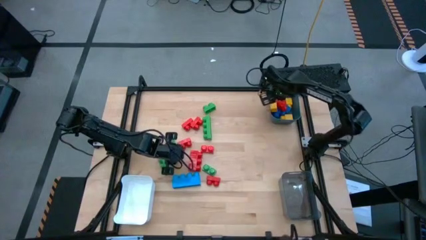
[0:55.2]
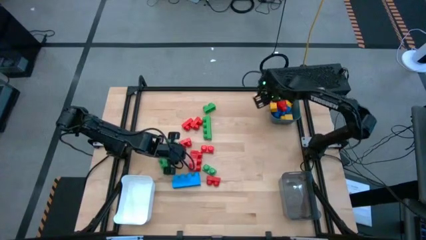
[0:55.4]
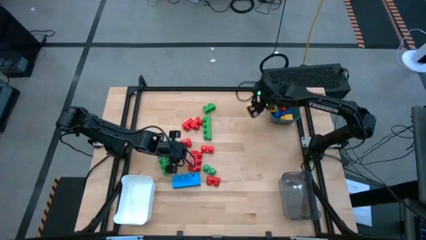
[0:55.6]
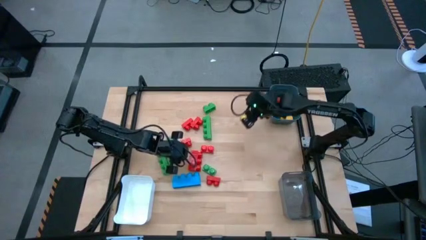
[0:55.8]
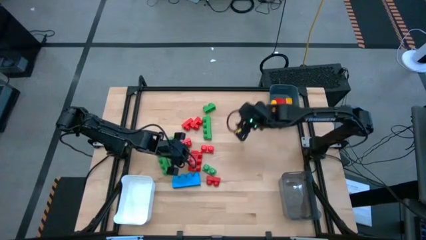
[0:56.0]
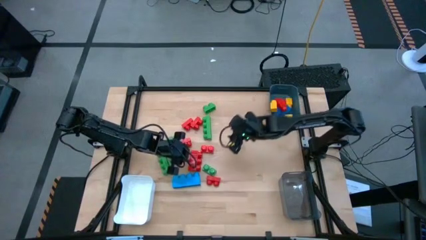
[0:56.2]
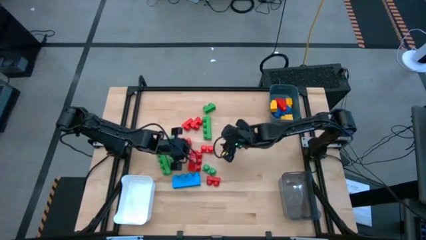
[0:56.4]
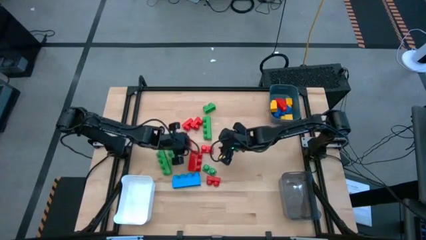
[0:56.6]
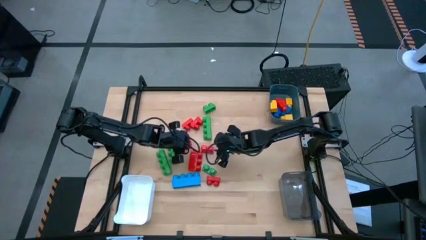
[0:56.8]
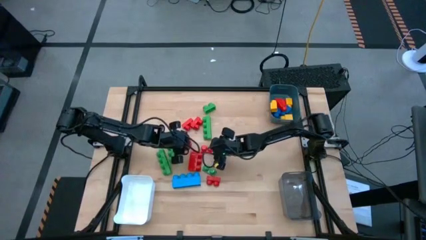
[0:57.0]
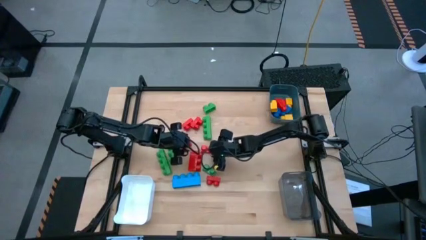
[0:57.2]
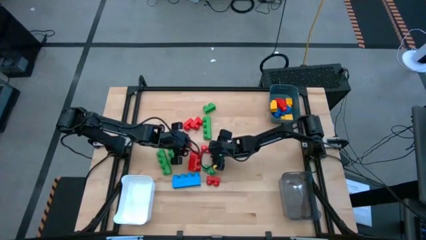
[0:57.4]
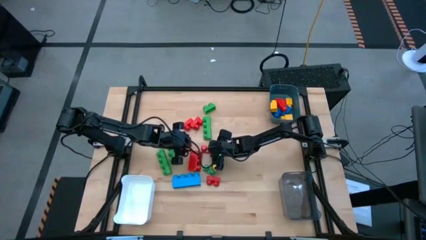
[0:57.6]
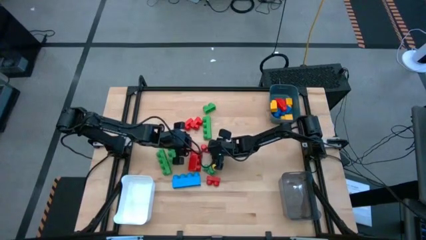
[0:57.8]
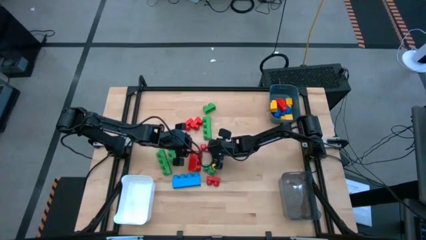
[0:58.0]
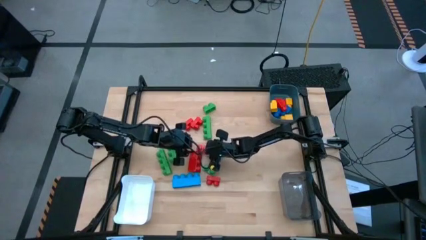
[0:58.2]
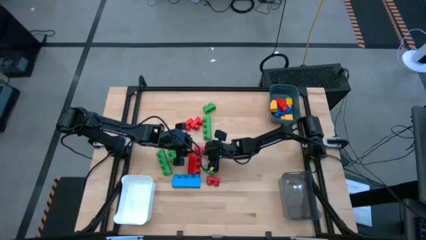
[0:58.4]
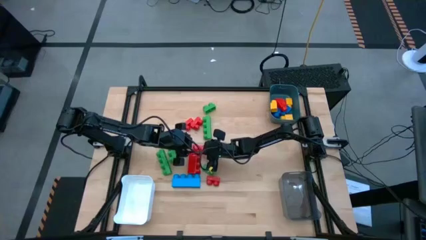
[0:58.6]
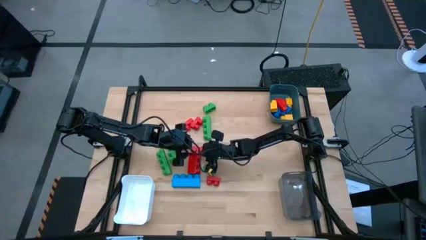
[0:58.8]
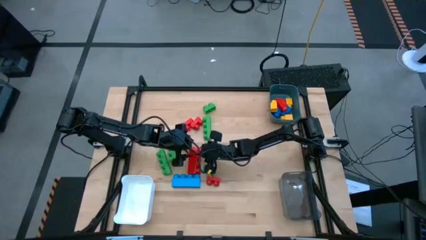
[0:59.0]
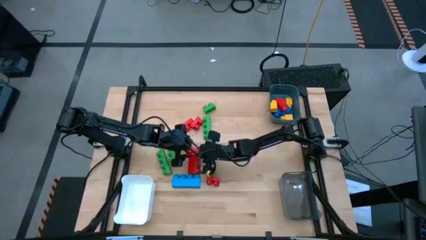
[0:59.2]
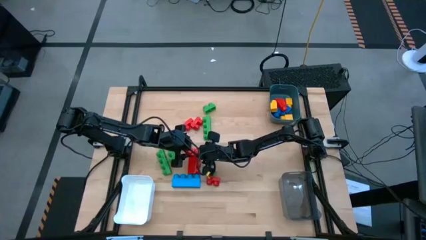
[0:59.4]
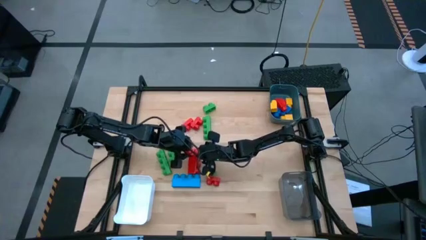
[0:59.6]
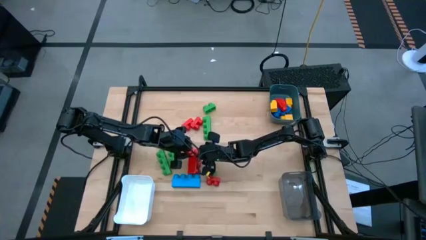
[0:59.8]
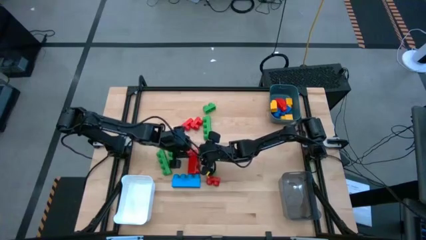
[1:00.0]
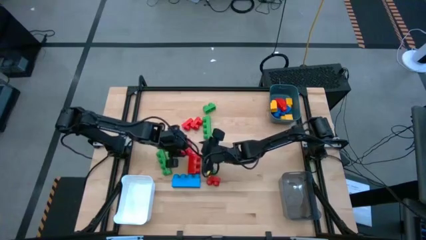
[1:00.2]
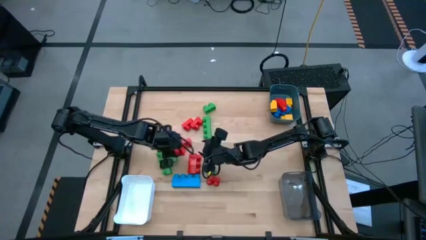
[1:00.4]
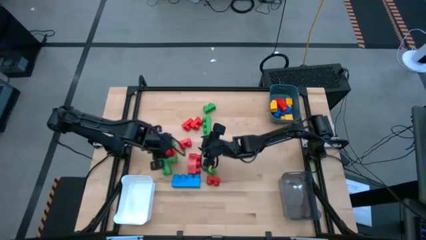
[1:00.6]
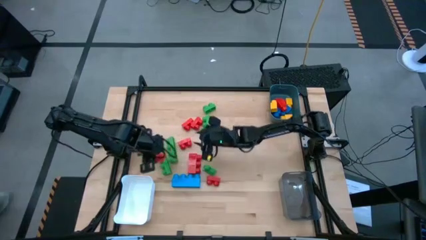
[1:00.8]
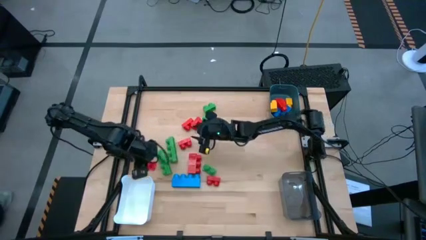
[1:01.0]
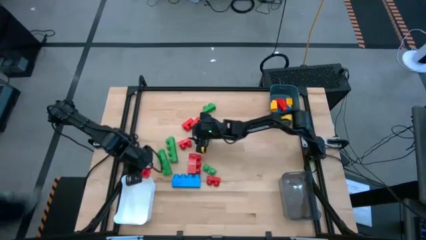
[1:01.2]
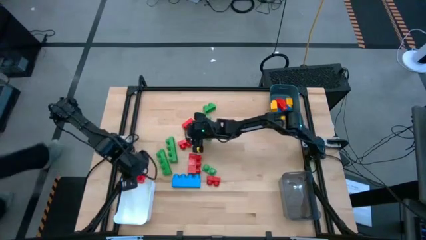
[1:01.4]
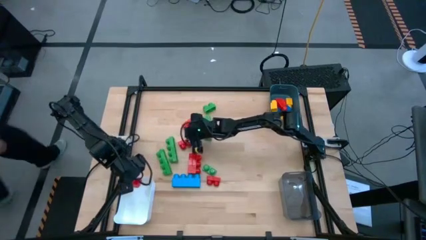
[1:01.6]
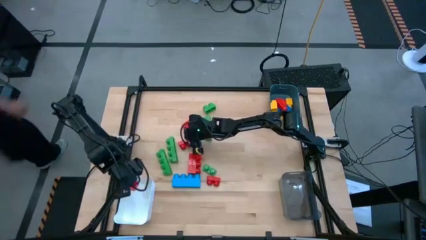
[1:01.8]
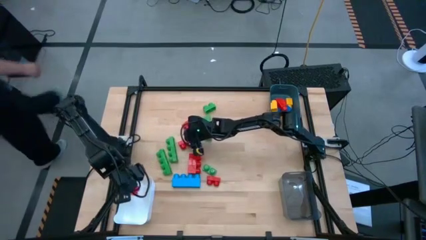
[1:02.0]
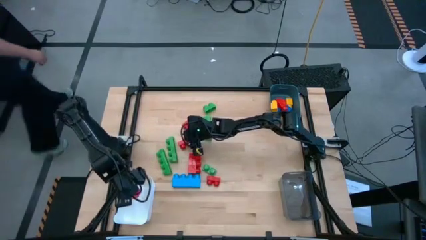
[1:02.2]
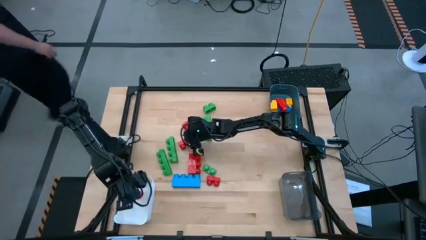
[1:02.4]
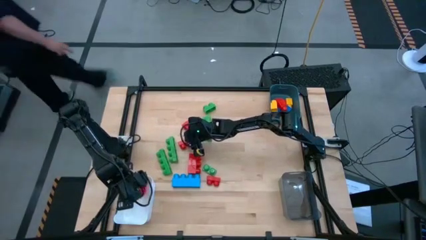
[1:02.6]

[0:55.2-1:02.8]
Task: Sort blocks by size
Put the two stud red game piece into the white bin

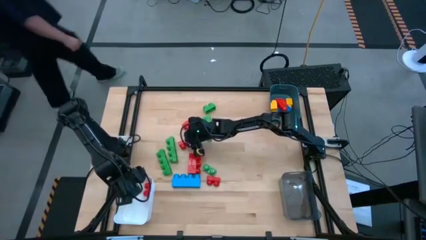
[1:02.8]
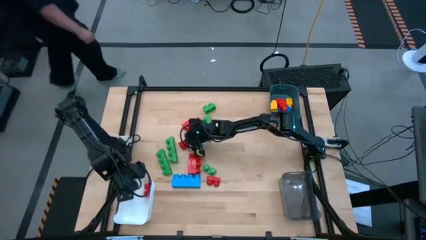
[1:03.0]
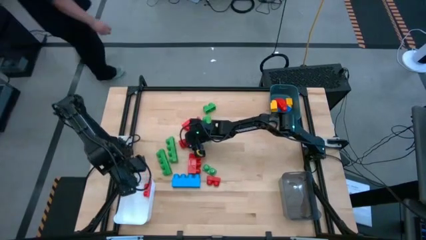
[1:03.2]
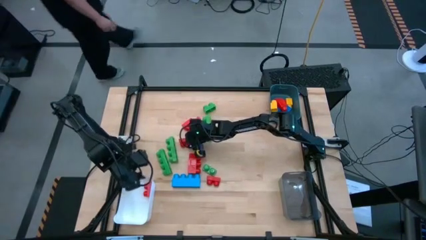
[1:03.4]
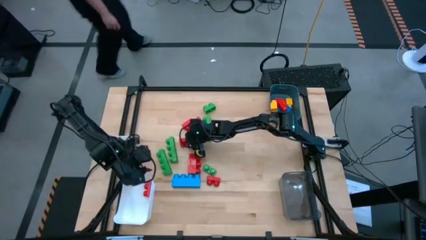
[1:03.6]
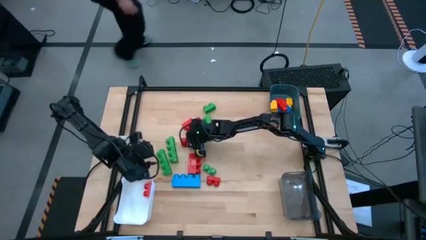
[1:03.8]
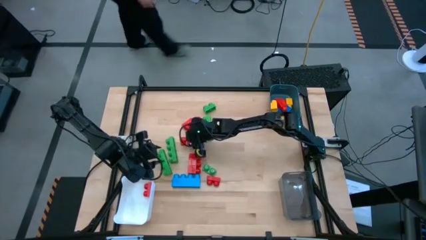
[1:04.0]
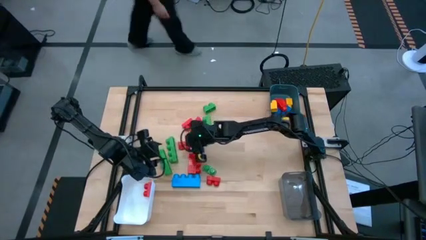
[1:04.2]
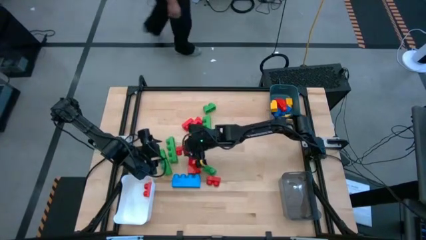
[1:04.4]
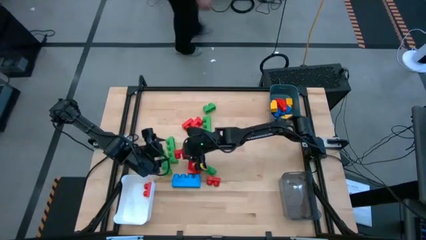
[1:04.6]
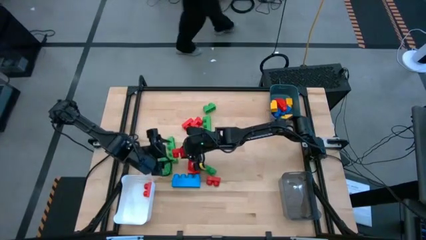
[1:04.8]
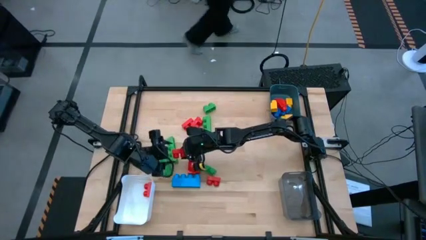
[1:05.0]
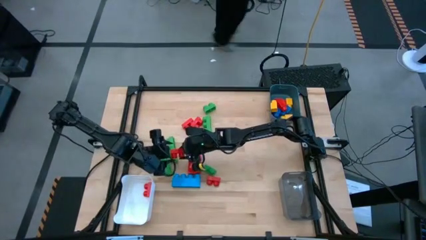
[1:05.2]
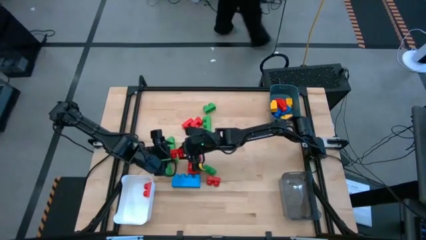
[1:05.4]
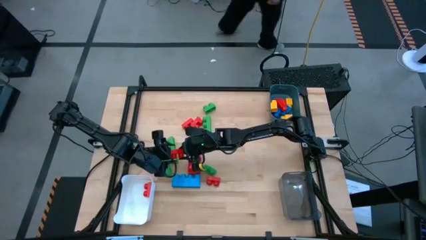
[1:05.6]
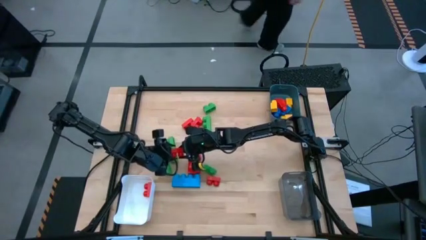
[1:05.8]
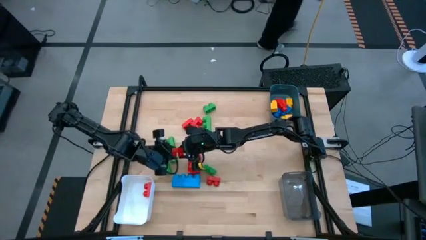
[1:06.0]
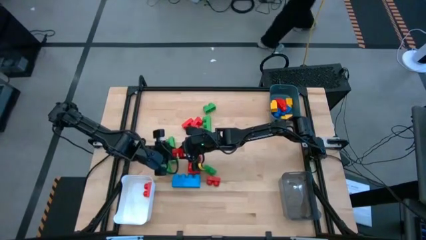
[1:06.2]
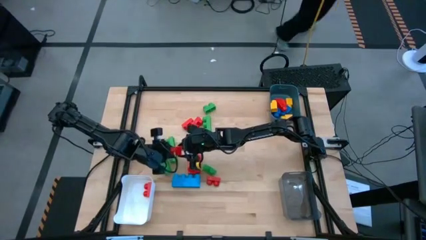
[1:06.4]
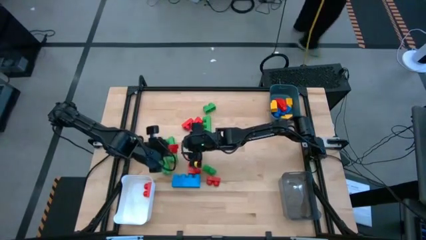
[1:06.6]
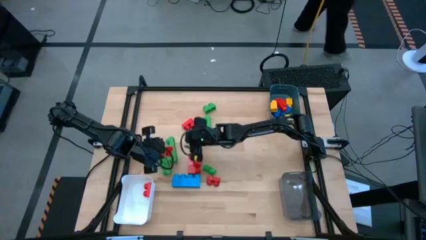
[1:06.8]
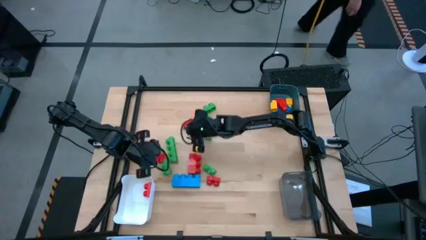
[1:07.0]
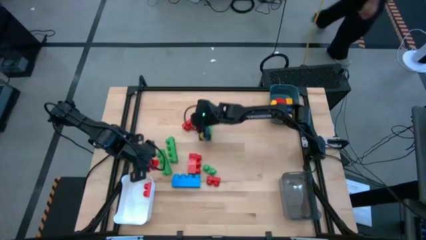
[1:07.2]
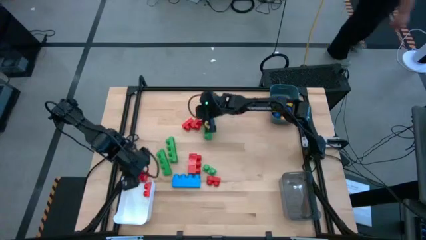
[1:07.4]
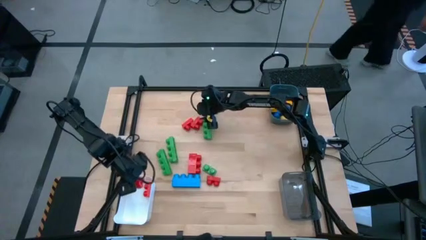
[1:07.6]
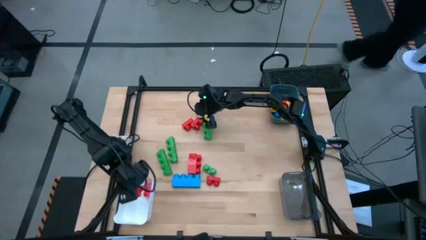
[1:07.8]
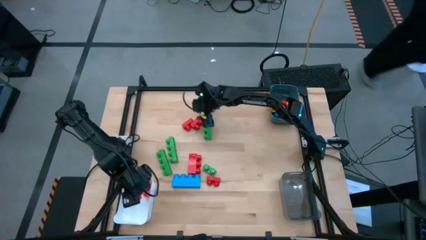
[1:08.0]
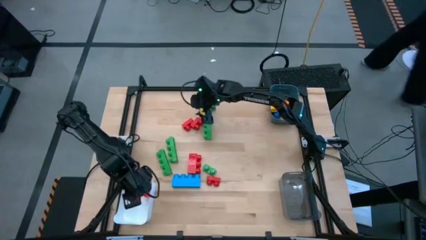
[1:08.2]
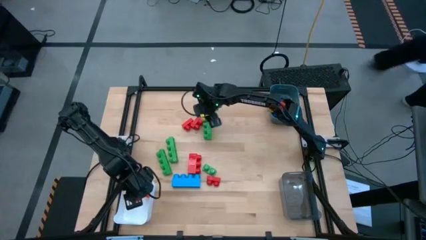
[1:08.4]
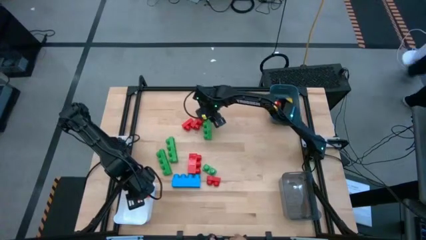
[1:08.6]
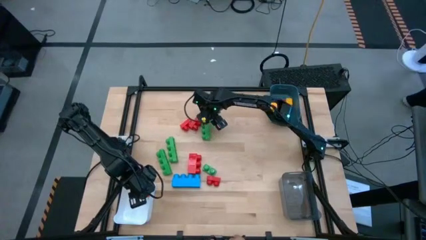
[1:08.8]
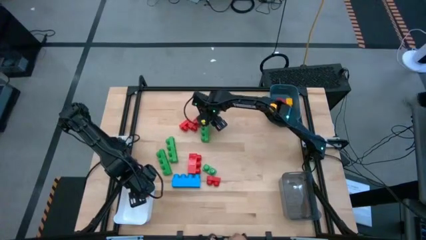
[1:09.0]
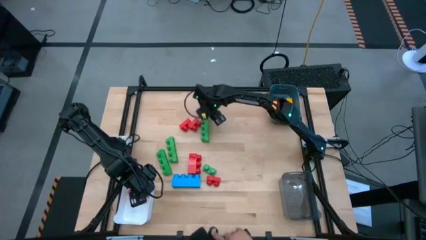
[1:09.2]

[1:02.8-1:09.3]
Put the two stud red game piece into the white bin
